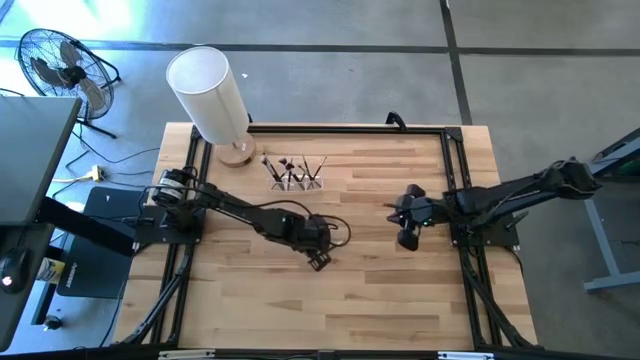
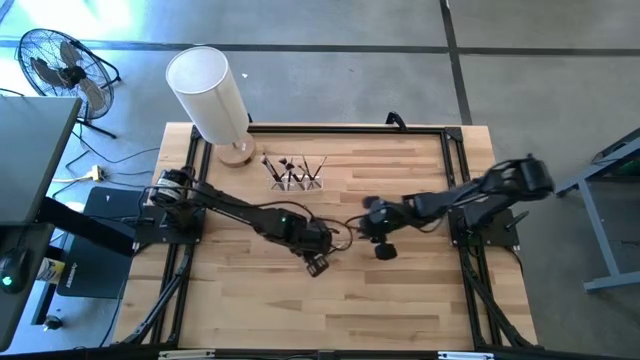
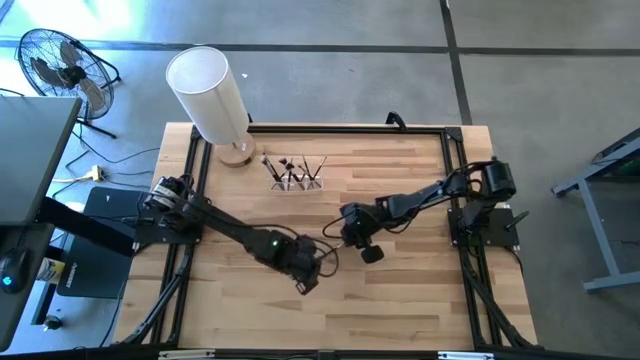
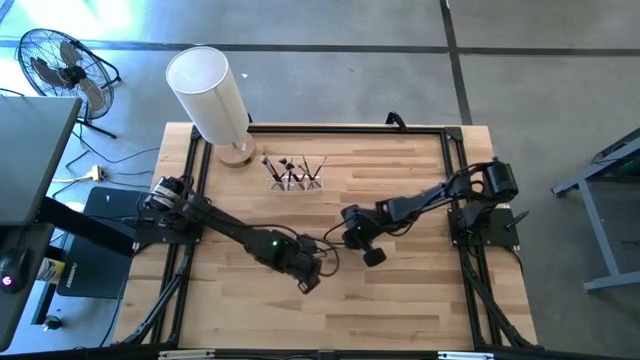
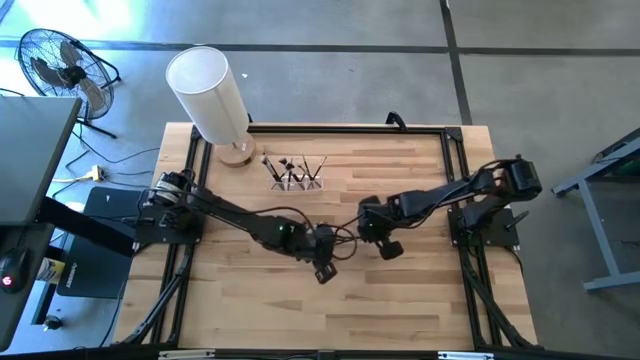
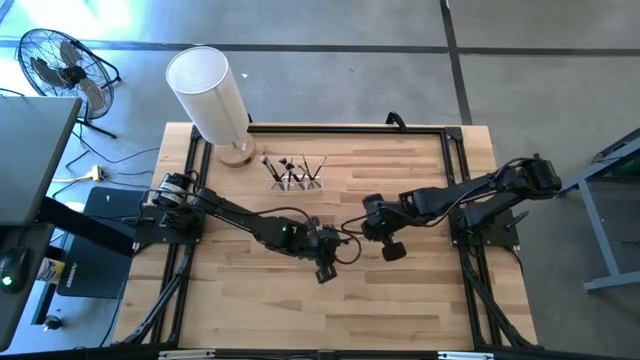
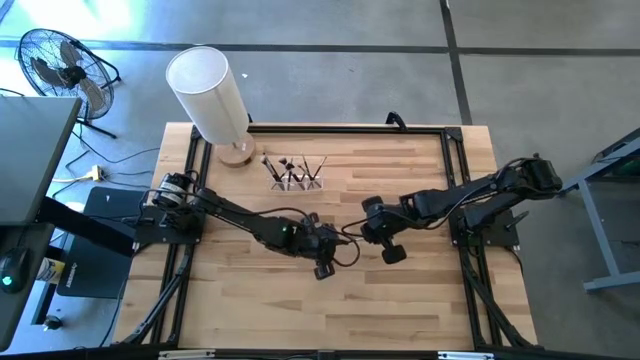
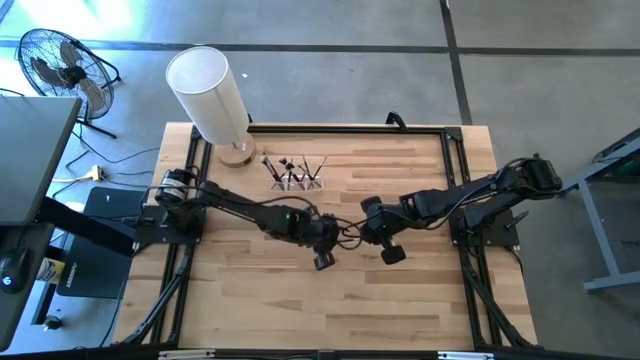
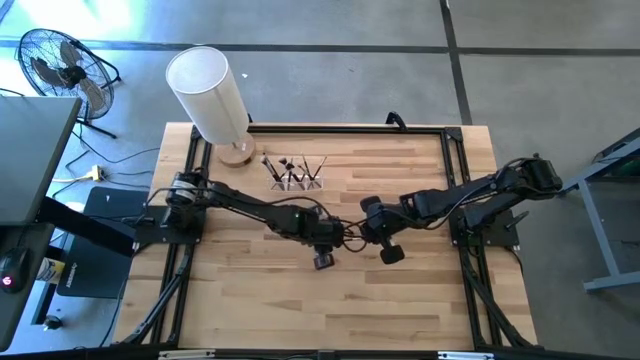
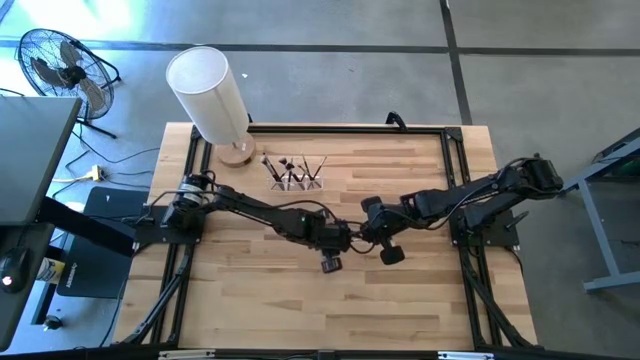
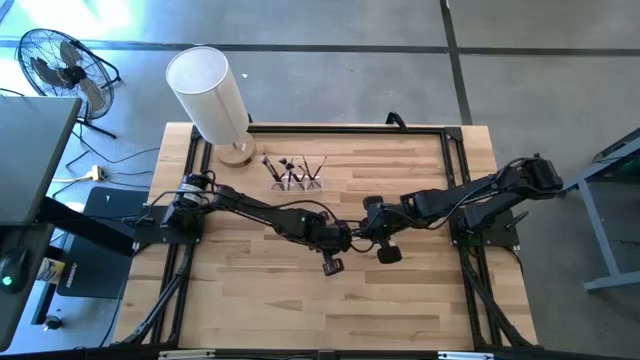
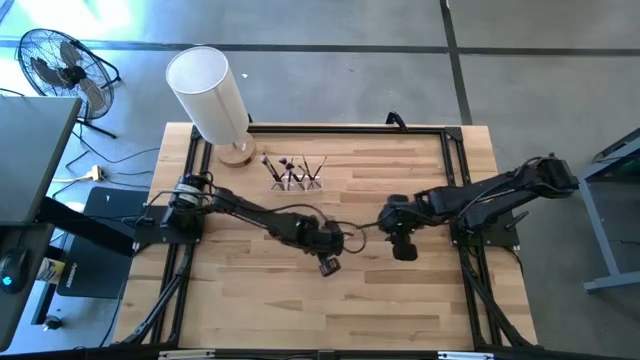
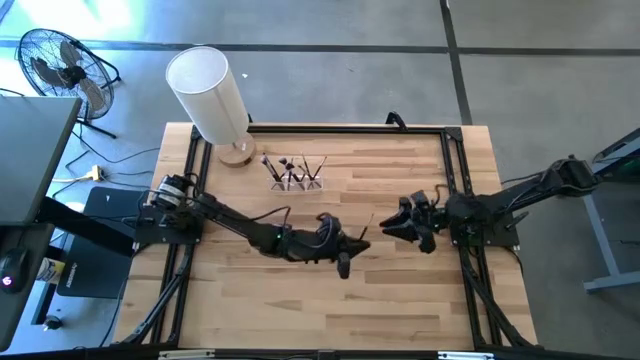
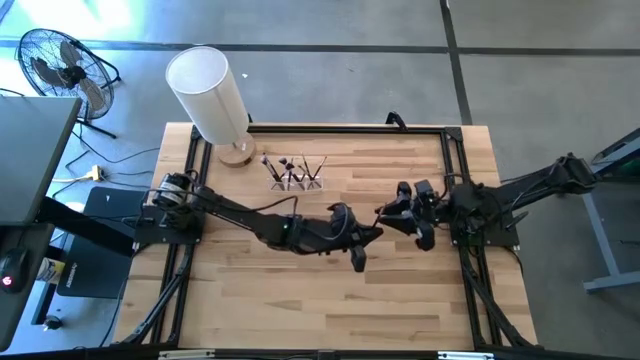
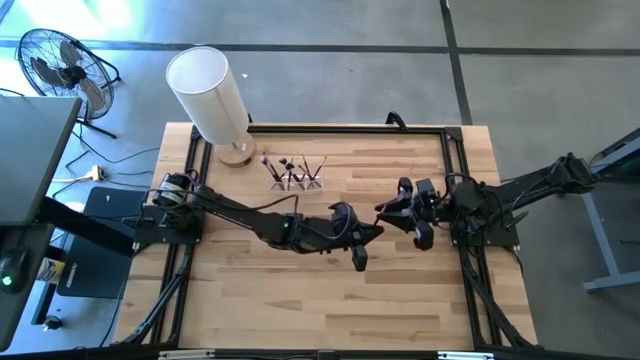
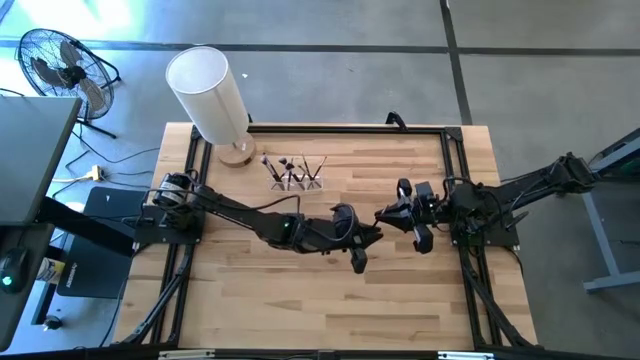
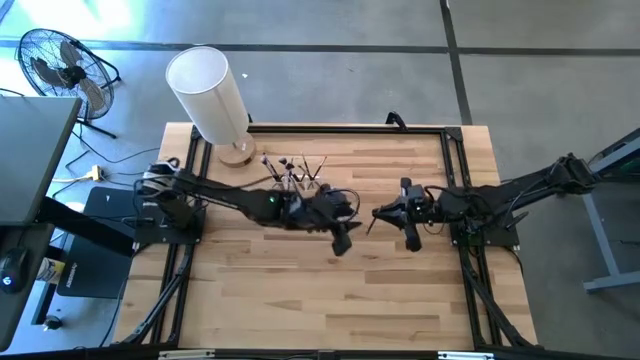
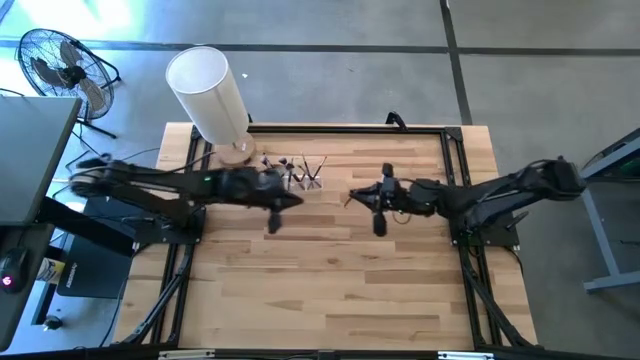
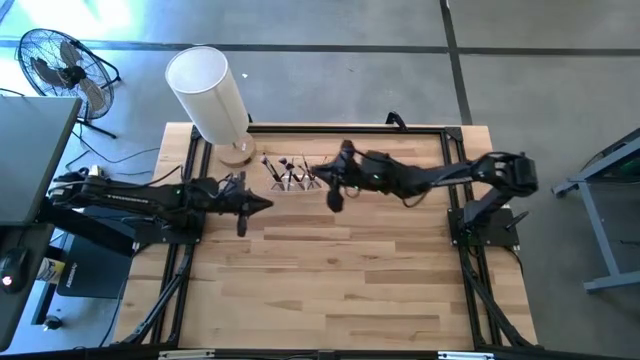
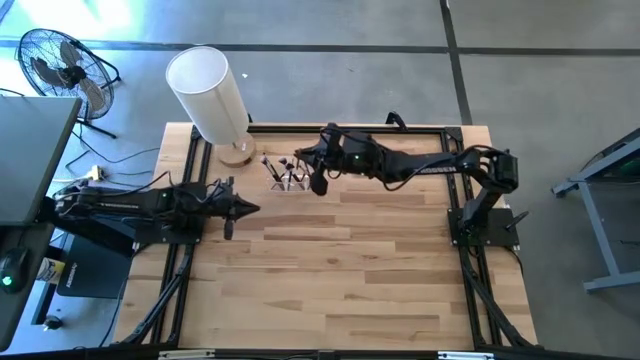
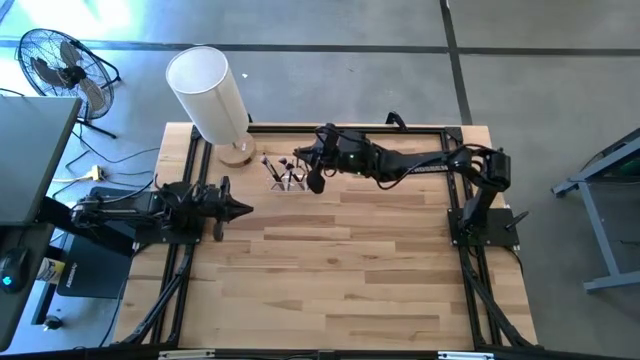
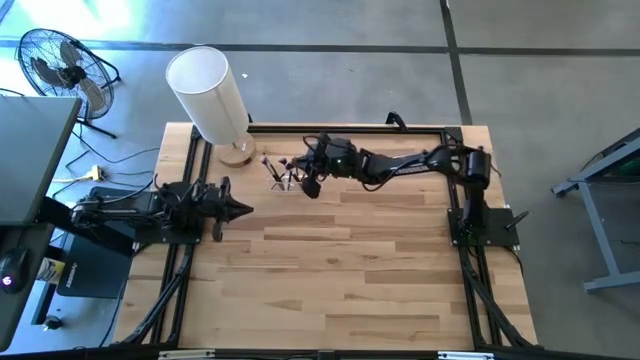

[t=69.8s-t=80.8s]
Task: Pick & Place Makeup Supplies
Put the black makeup brush into the transparent organizer

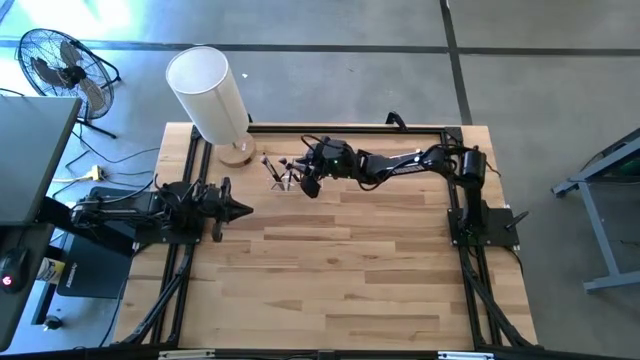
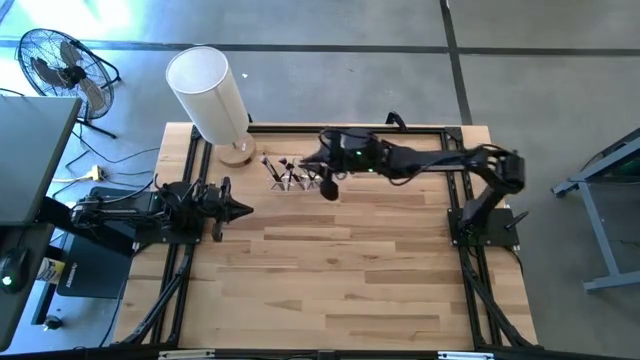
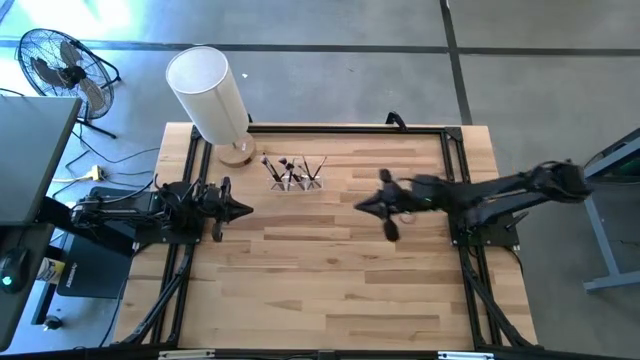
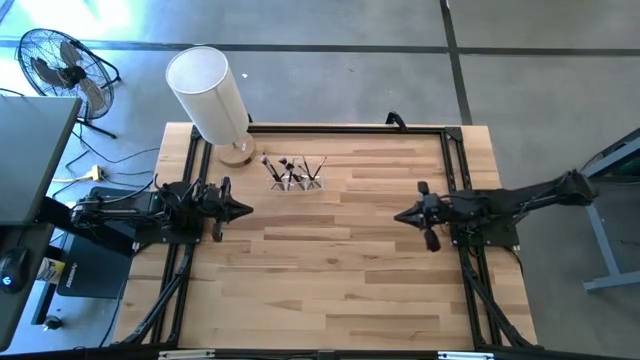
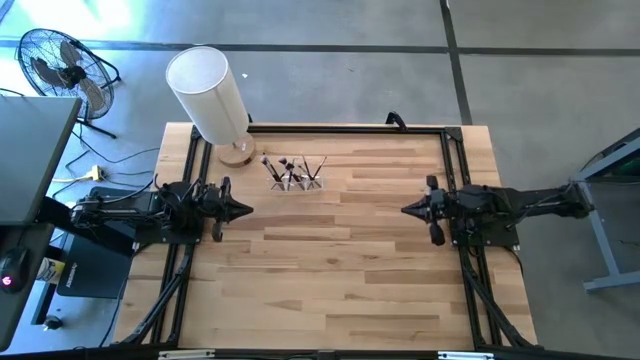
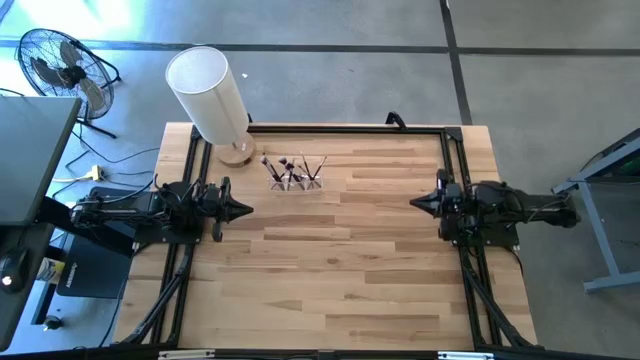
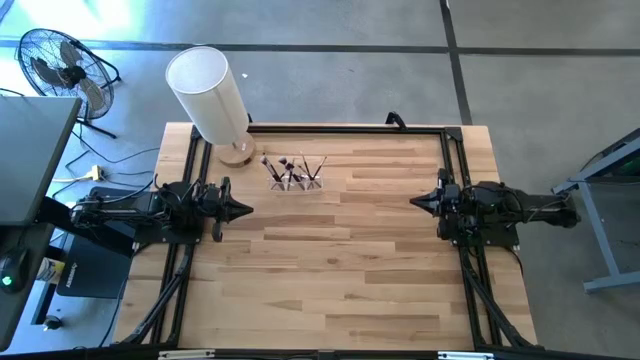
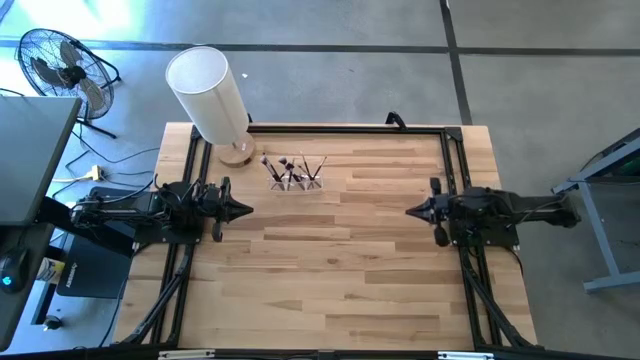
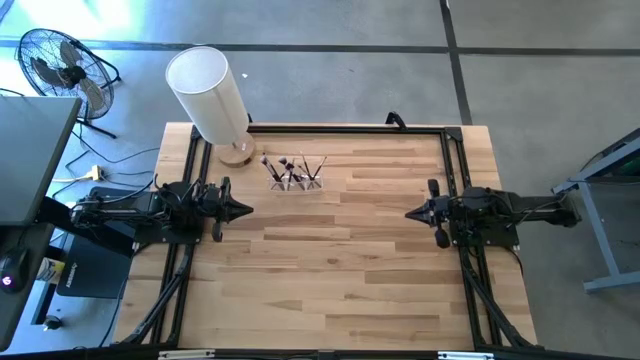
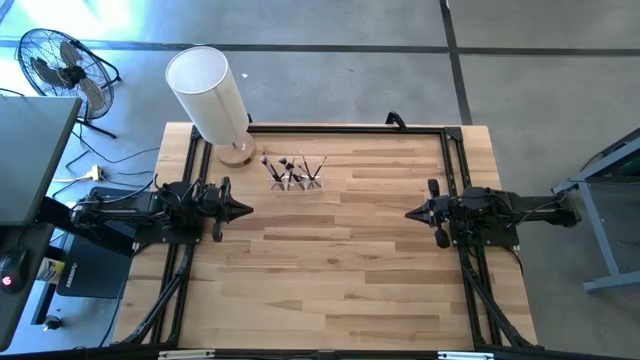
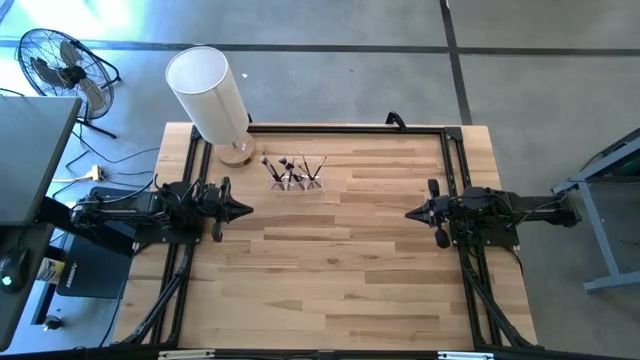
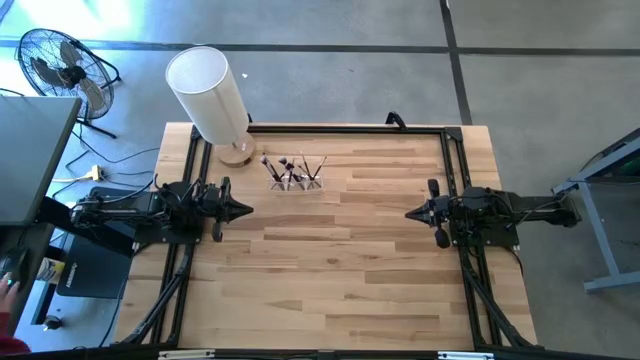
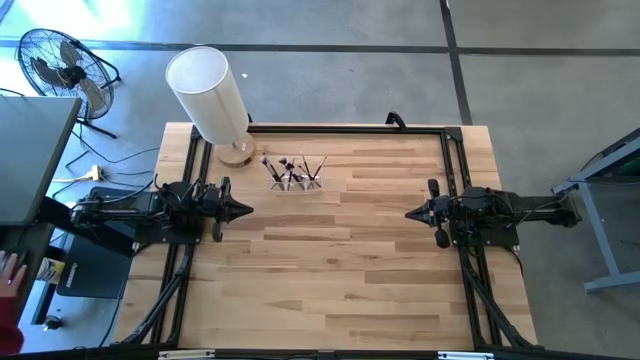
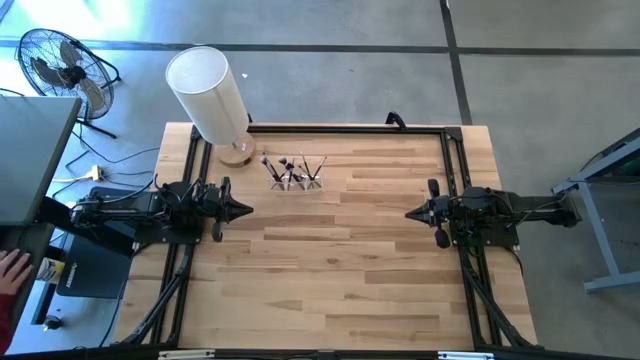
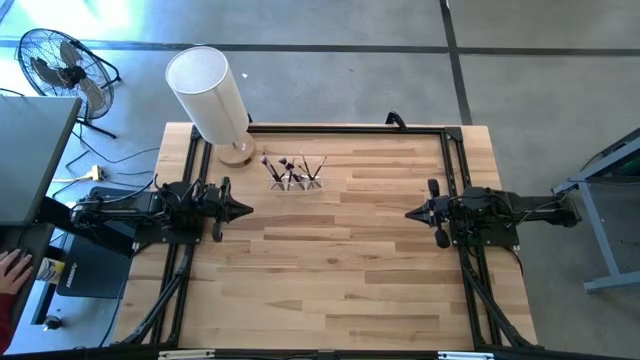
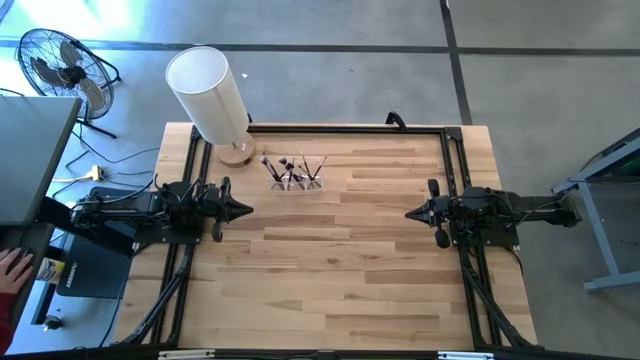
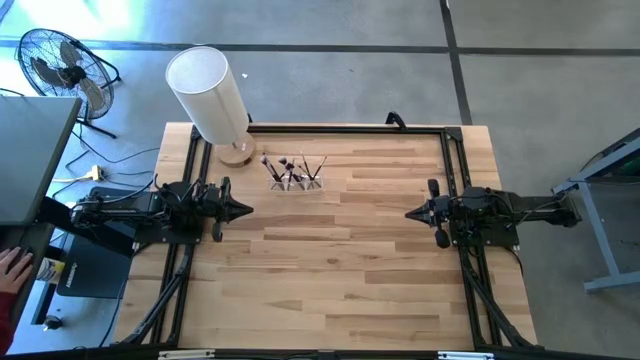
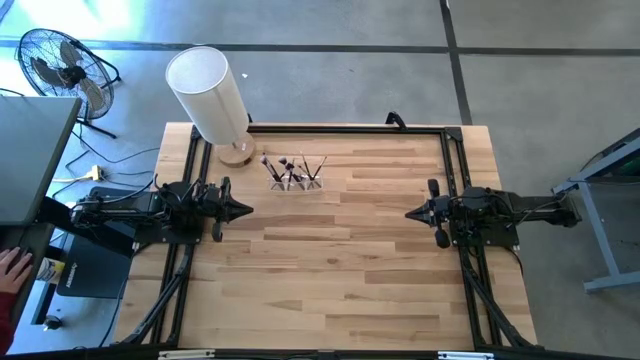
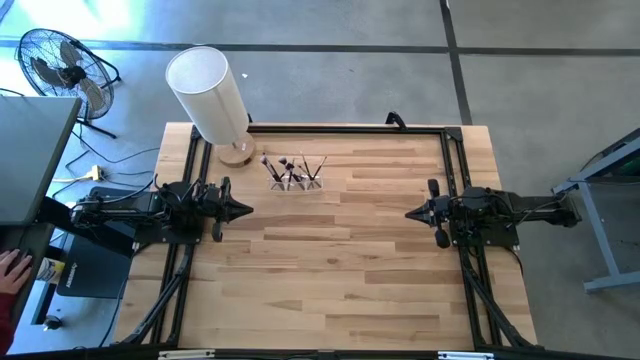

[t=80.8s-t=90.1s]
Return to Home Position

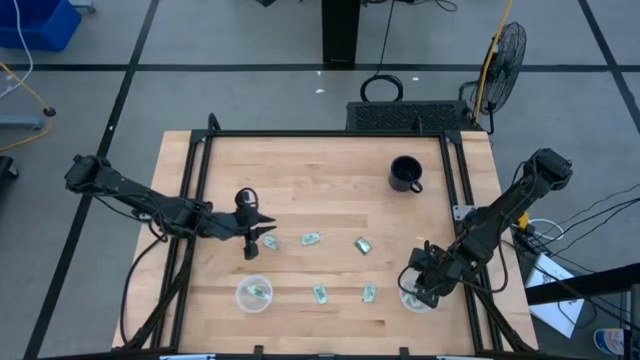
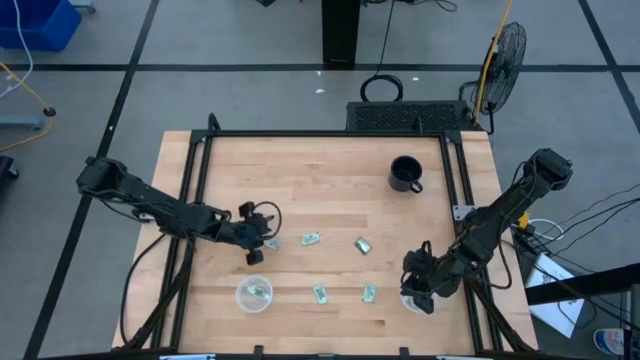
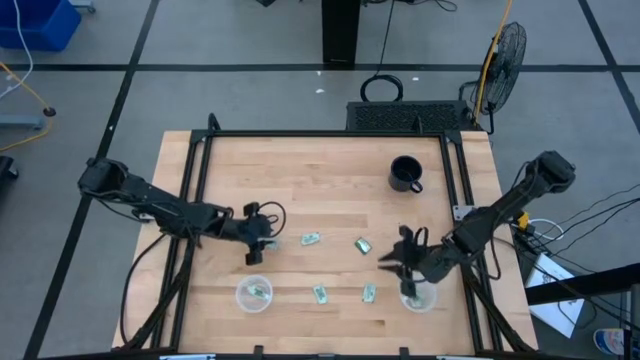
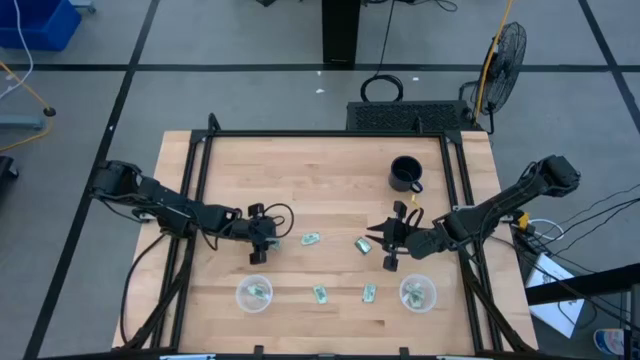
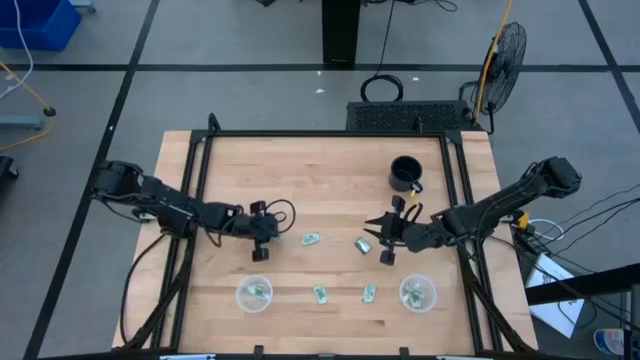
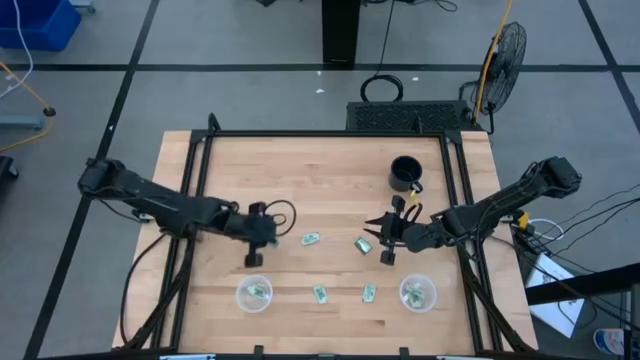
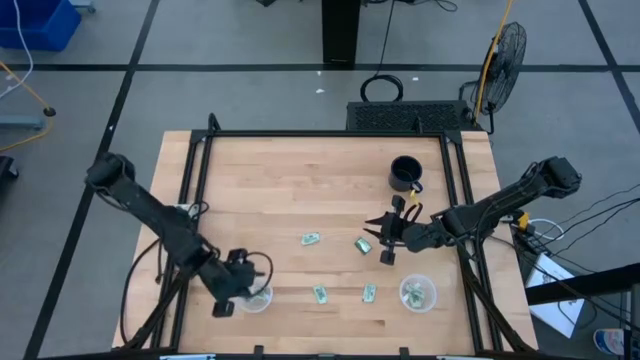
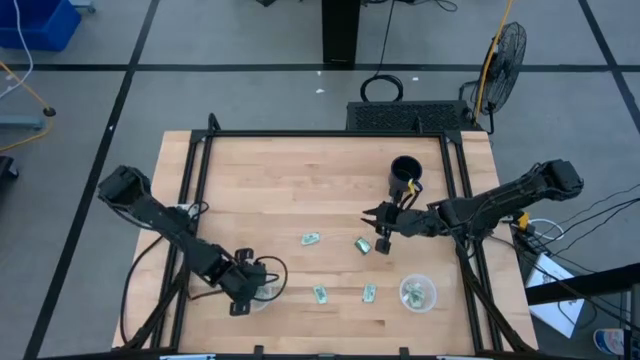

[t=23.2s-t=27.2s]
Task: Pick and place Stevia / Truvia into bins
Put the stevia packet into the left transparent container
